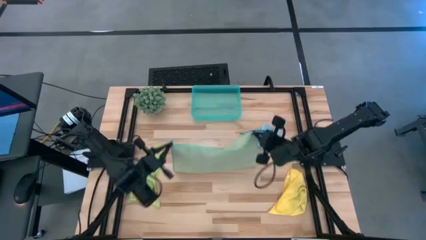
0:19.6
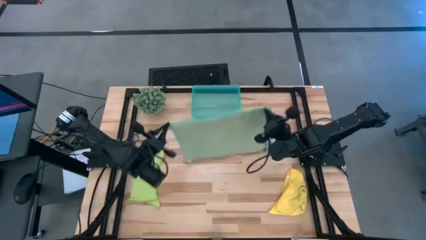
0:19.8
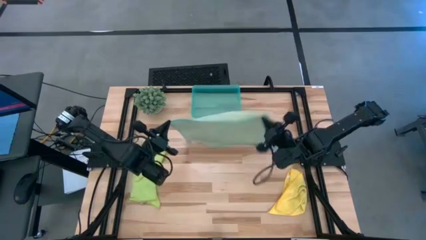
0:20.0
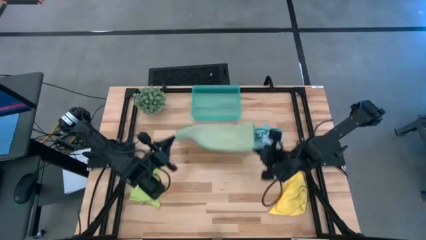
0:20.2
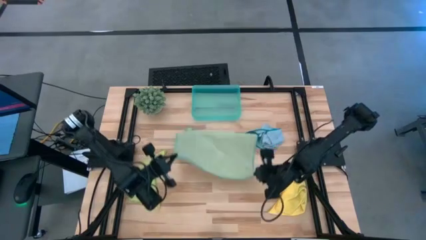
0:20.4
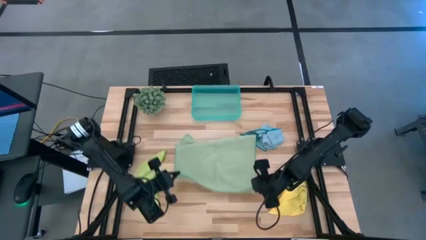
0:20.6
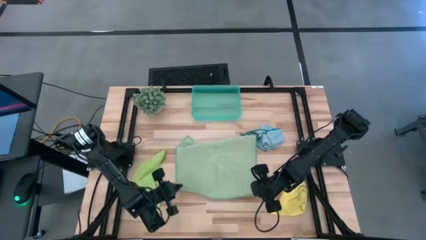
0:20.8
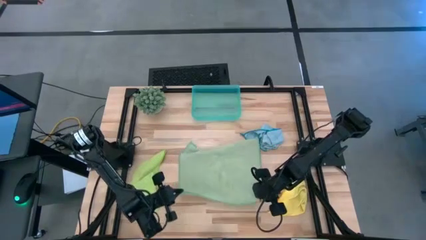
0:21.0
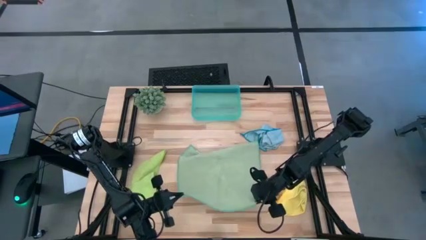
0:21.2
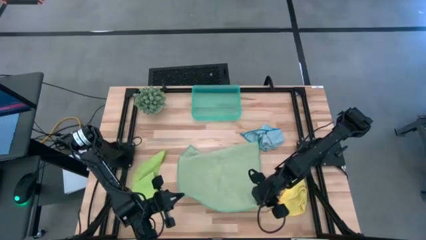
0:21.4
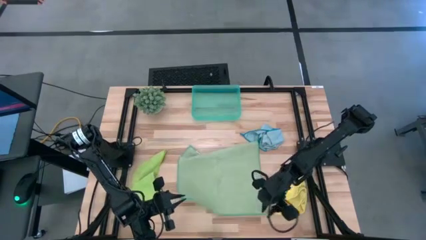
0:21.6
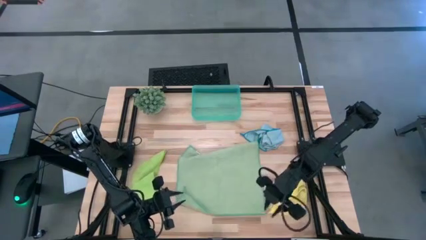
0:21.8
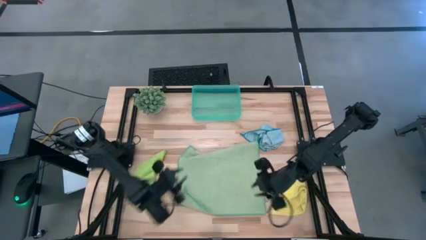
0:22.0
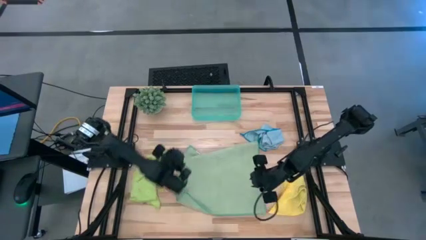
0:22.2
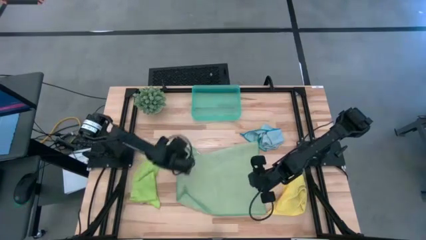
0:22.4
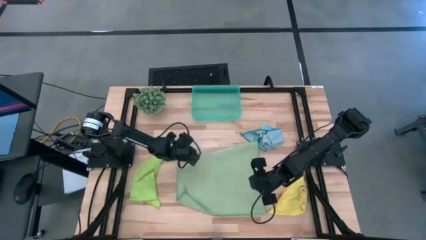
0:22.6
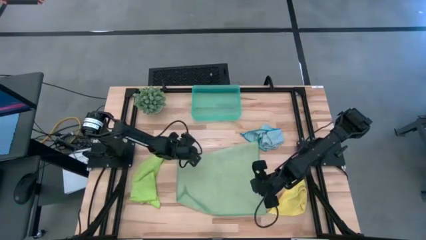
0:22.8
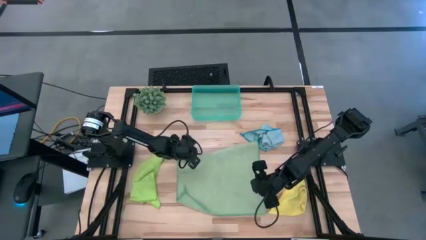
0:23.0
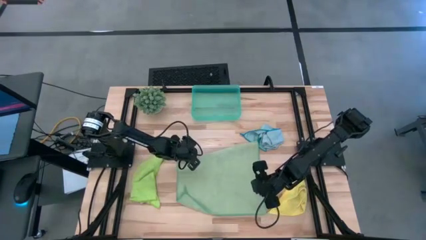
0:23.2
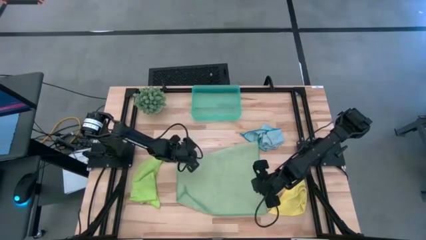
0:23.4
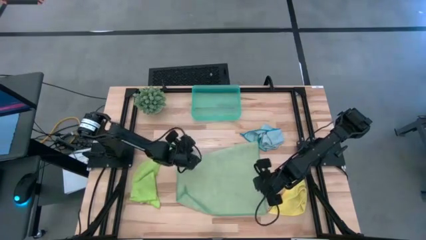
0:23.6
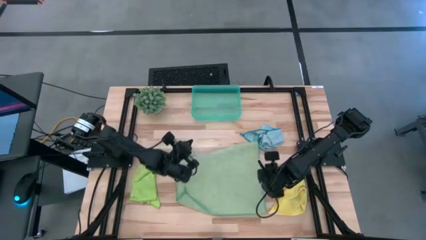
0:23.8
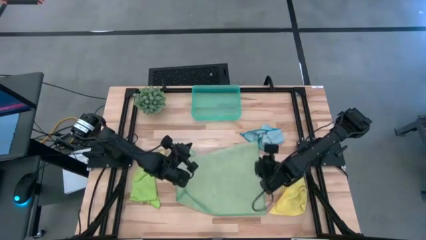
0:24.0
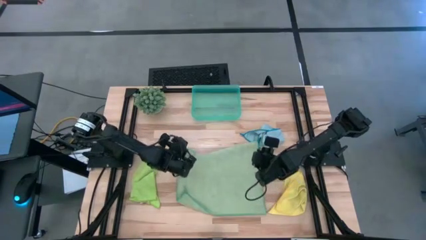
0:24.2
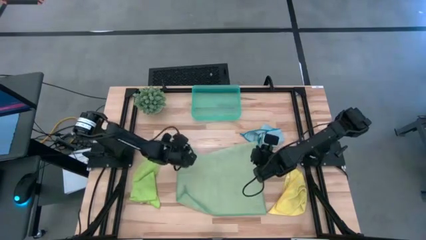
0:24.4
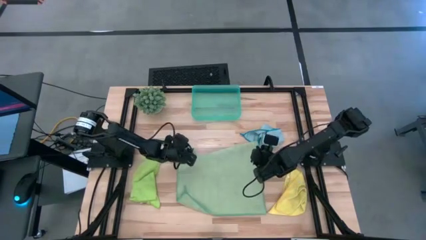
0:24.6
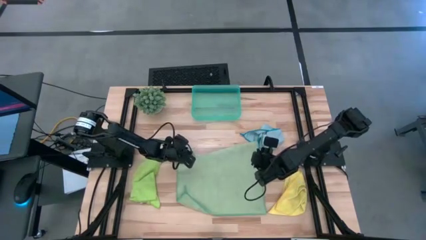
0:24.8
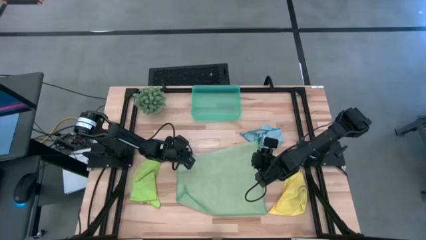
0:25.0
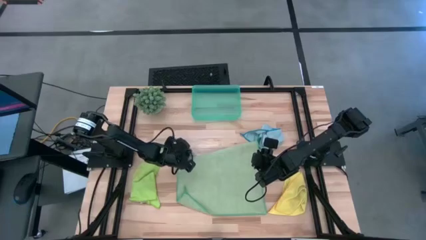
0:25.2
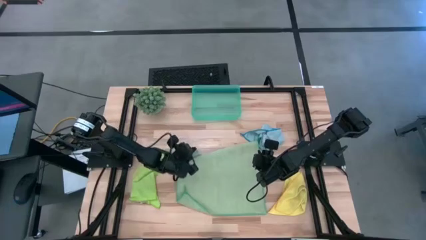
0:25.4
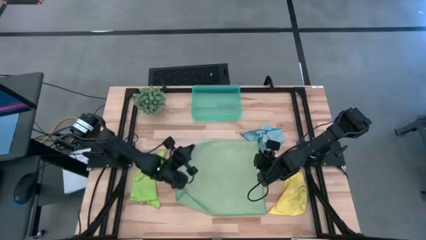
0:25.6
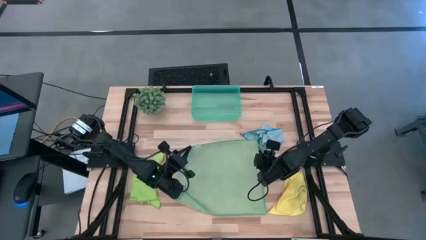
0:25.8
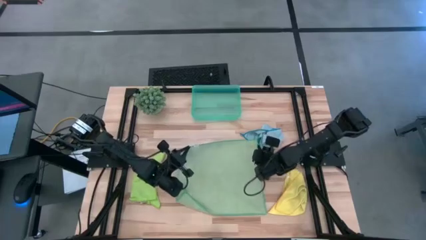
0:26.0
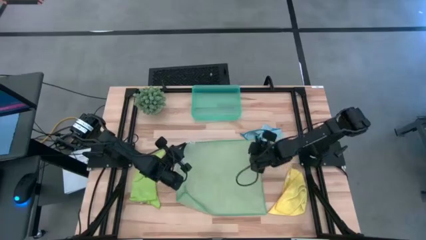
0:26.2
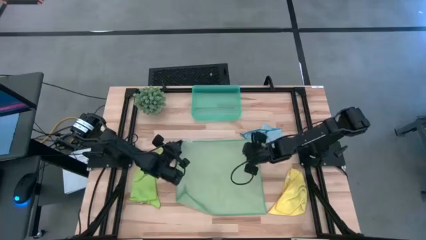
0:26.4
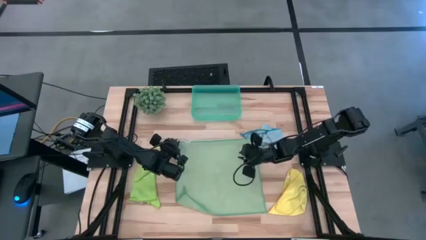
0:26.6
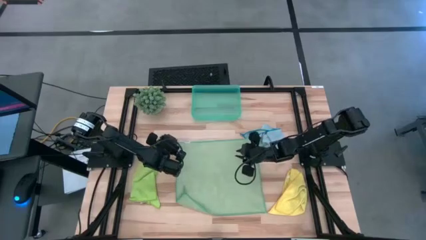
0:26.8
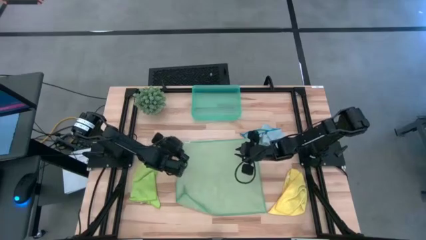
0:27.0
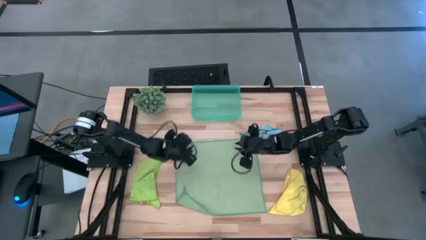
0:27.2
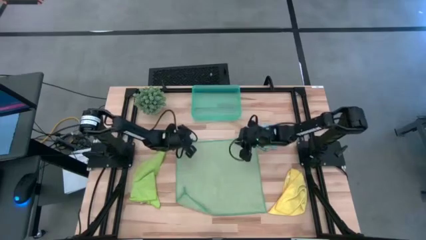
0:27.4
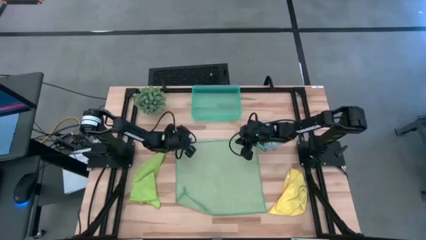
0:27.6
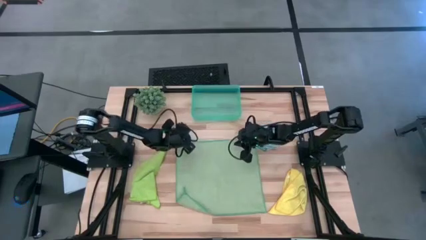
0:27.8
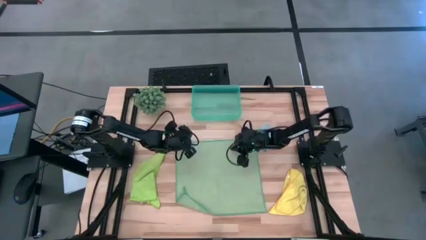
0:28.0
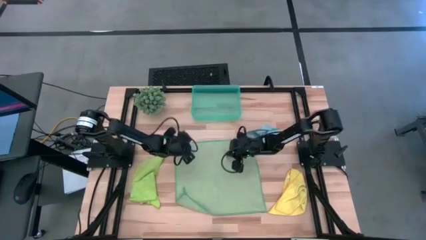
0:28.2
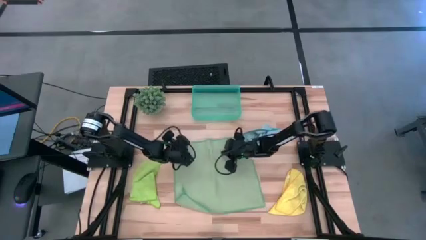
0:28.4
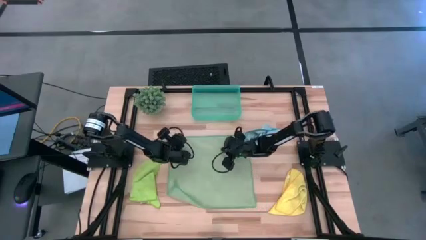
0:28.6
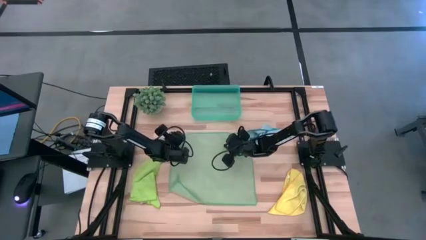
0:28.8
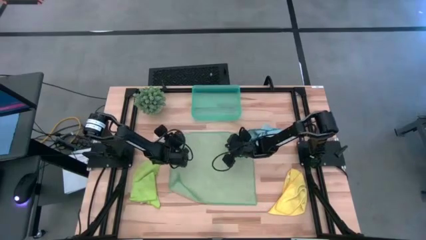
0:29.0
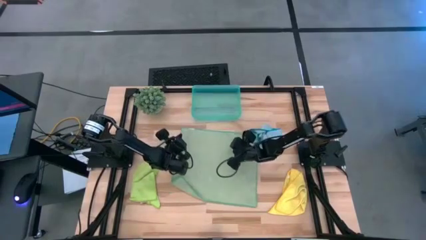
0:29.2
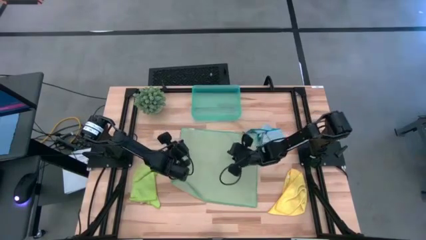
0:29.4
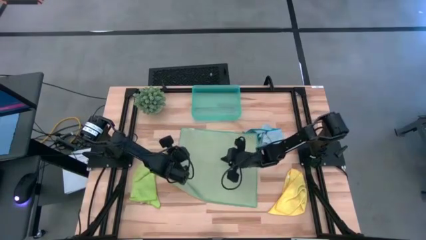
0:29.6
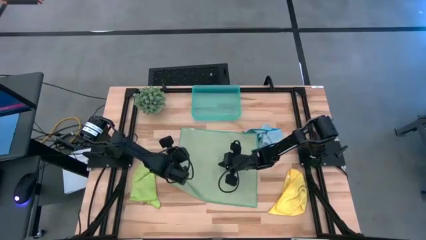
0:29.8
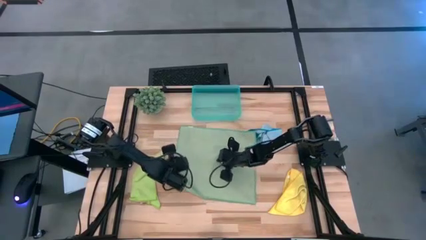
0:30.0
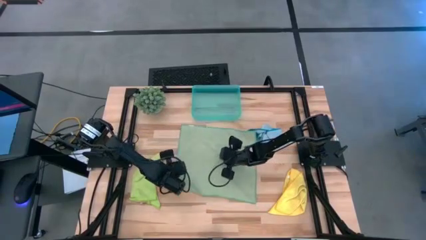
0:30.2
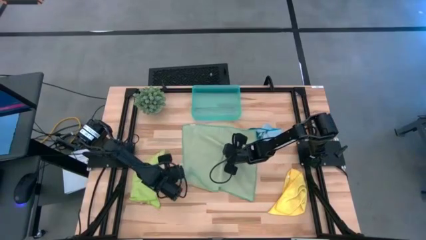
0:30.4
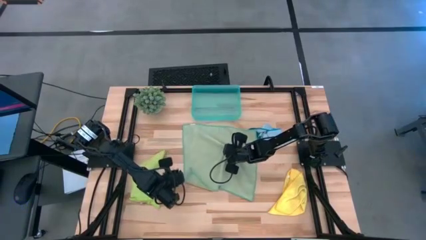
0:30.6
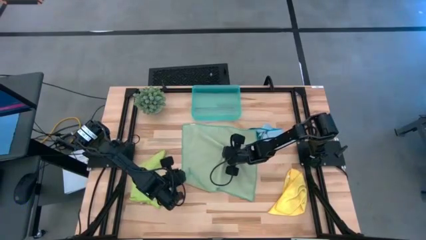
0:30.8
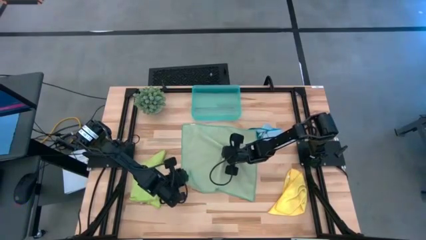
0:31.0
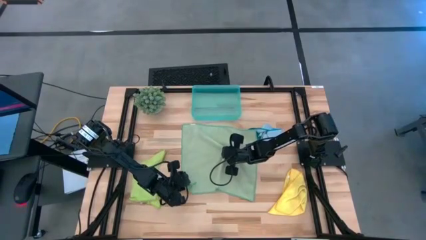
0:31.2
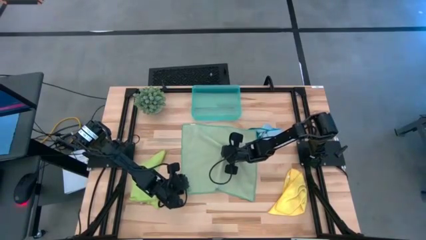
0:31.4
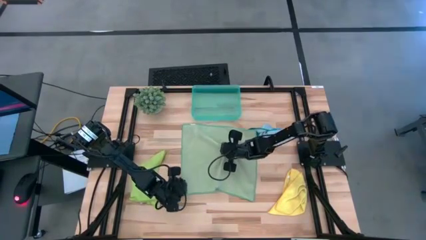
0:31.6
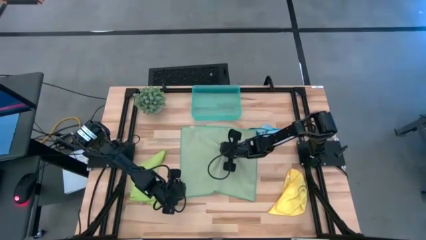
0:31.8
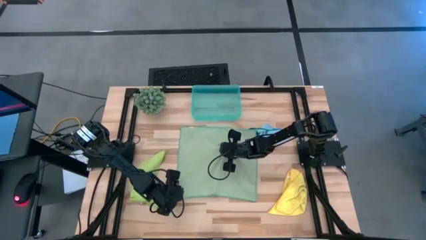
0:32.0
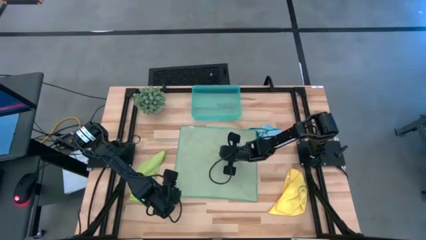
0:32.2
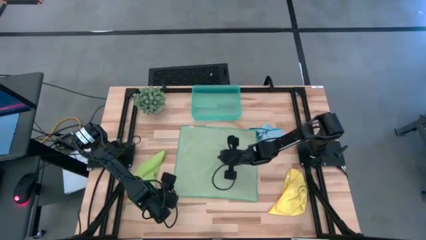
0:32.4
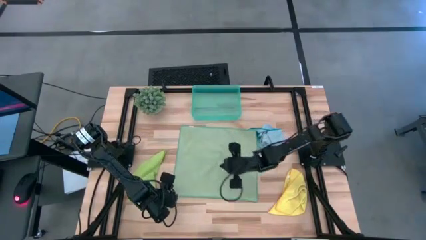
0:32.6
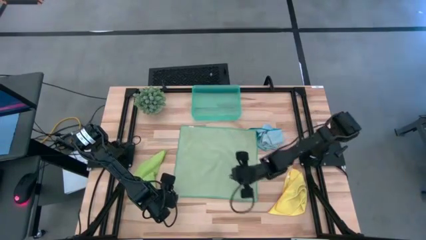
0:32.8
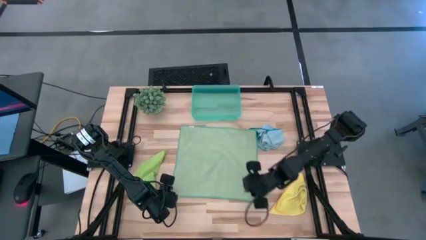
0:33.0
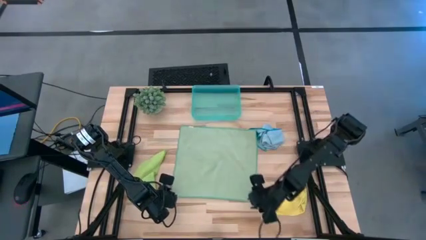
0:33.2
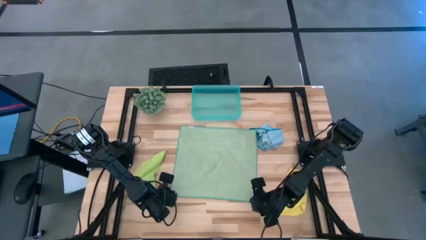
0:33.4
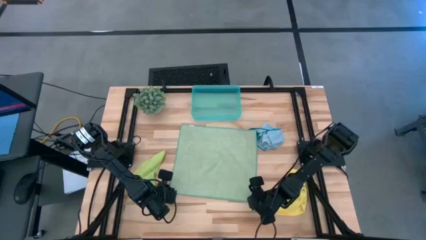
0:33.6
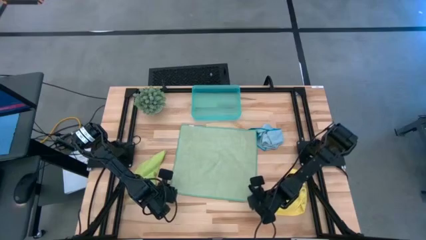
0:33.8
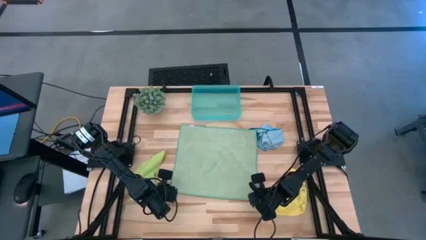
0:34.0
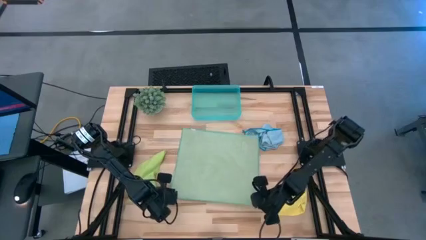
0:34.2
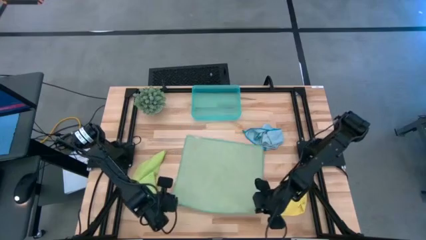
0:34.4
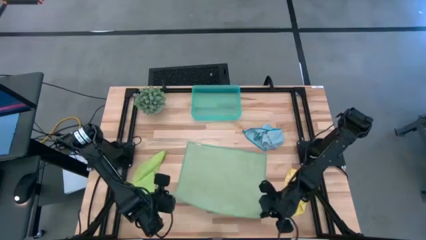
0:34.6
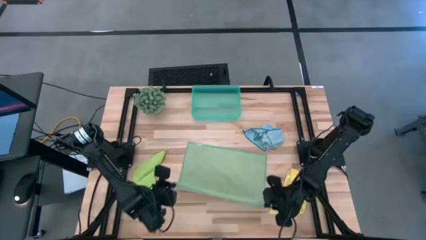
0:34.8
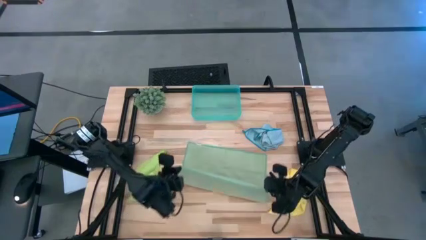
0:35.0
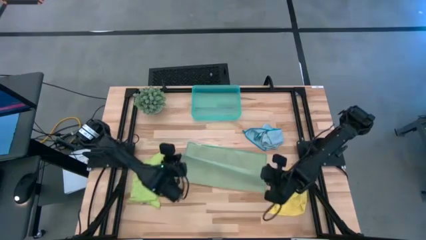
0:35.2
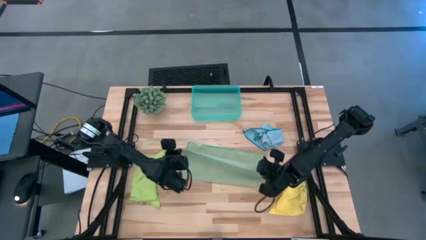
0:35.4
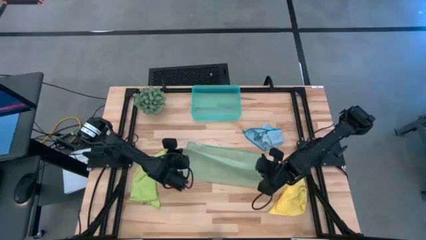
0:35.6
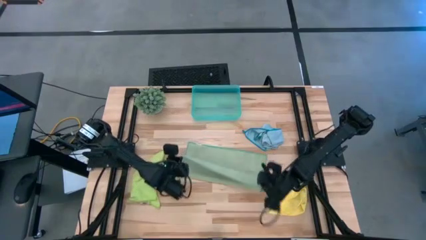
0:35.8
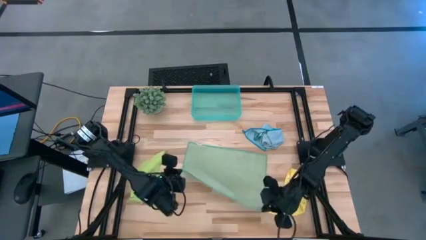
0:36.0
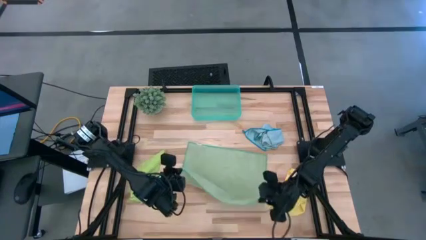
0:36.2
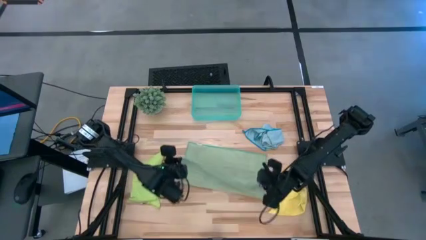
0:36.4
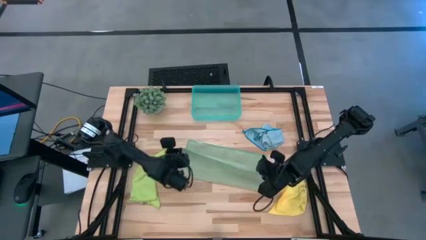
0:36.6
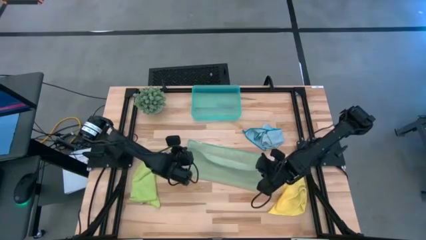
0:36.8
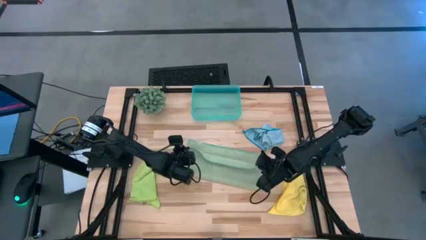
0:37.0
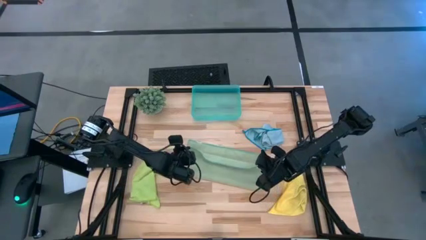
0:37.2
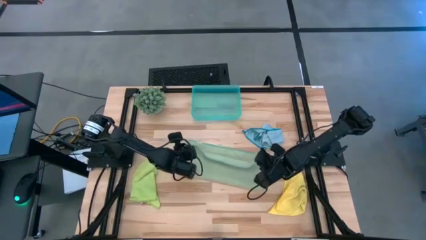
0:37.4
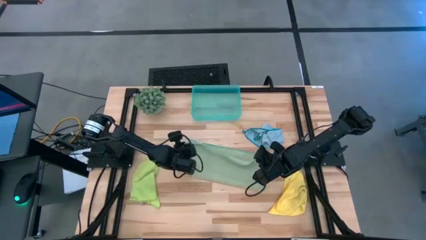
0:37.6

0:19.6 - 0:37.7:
Task: Fold microfiber towels
Fold the green towel
